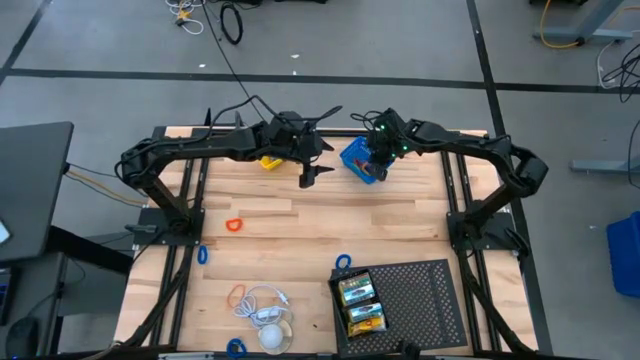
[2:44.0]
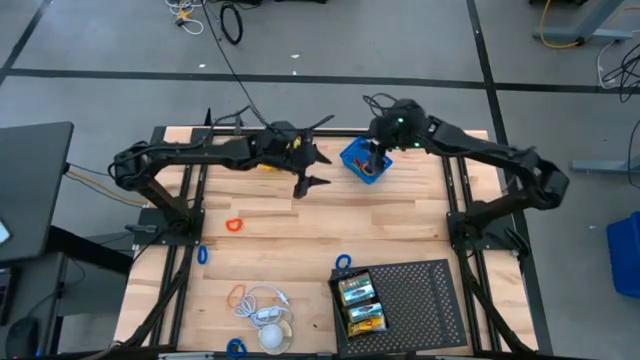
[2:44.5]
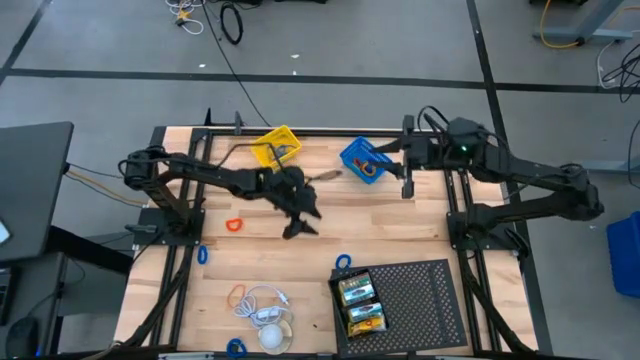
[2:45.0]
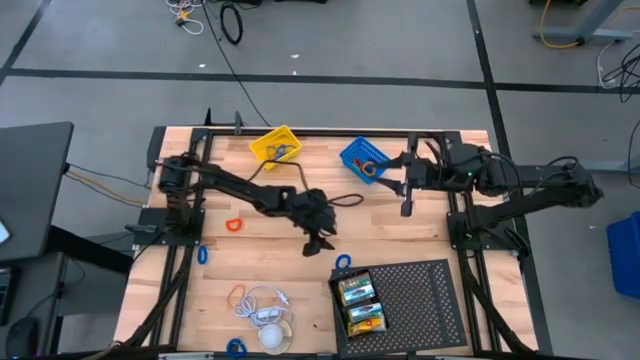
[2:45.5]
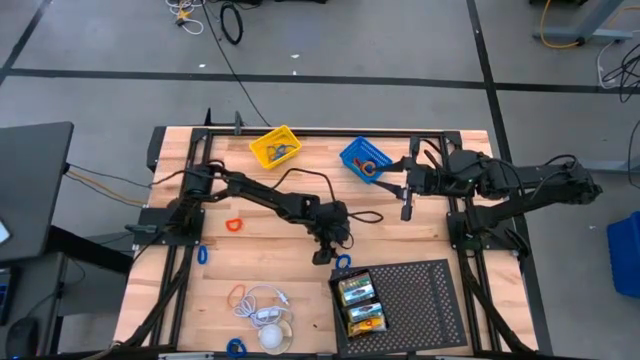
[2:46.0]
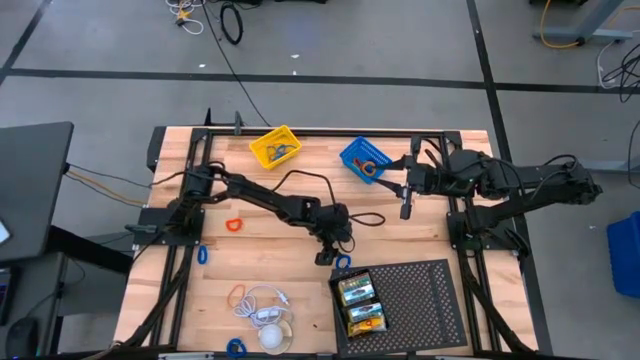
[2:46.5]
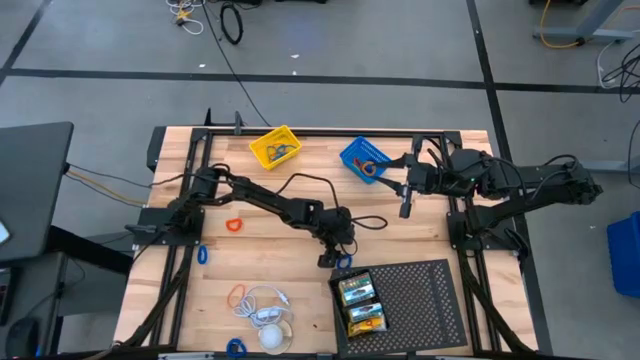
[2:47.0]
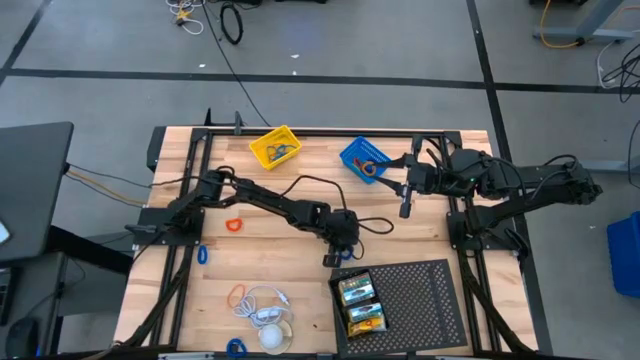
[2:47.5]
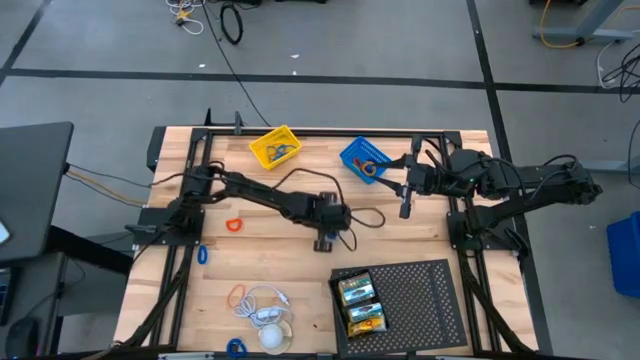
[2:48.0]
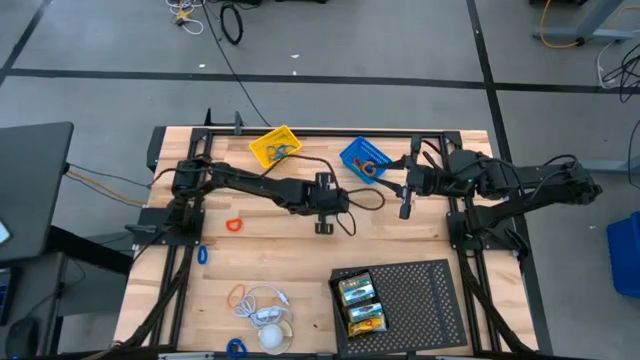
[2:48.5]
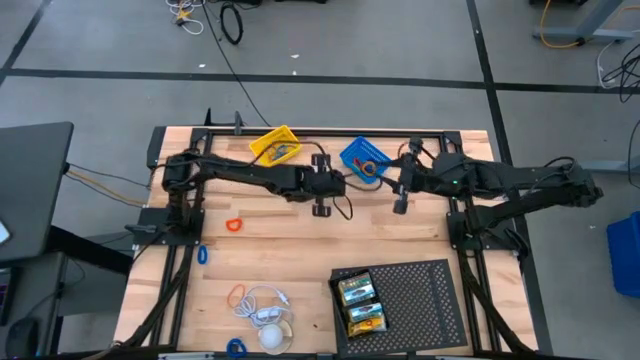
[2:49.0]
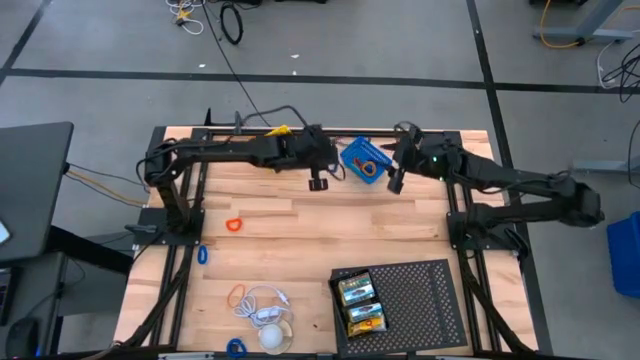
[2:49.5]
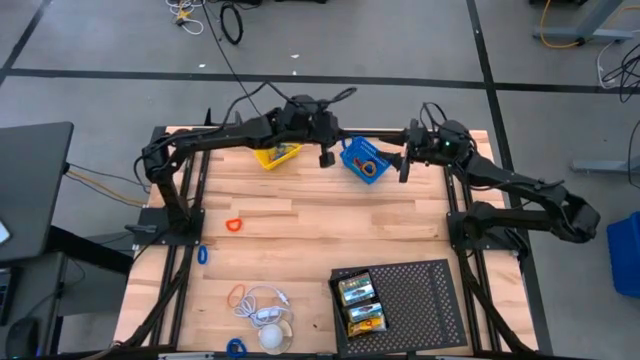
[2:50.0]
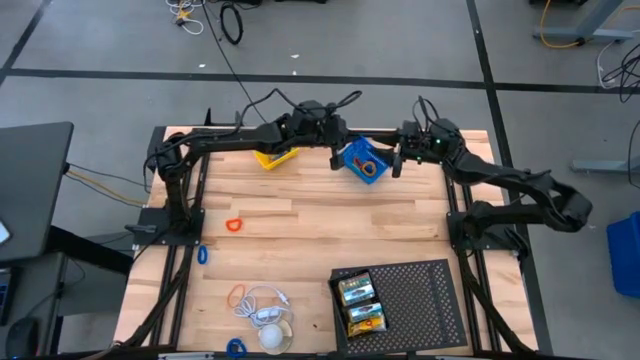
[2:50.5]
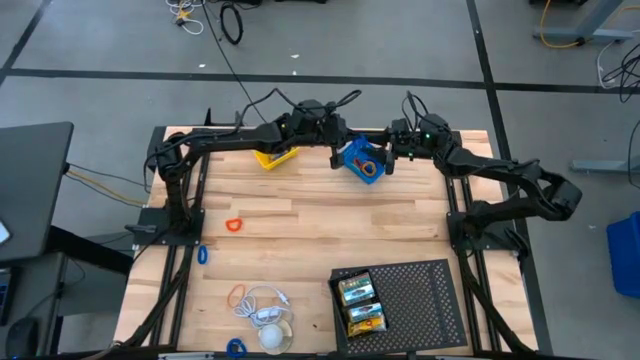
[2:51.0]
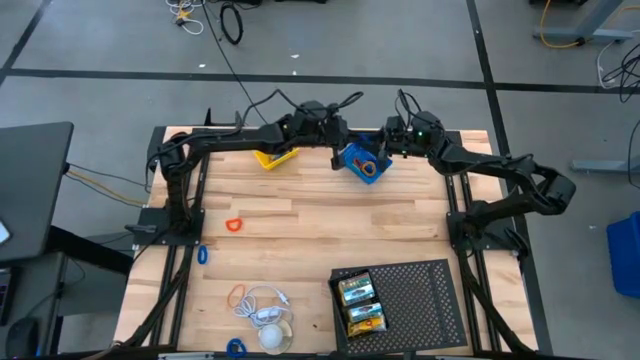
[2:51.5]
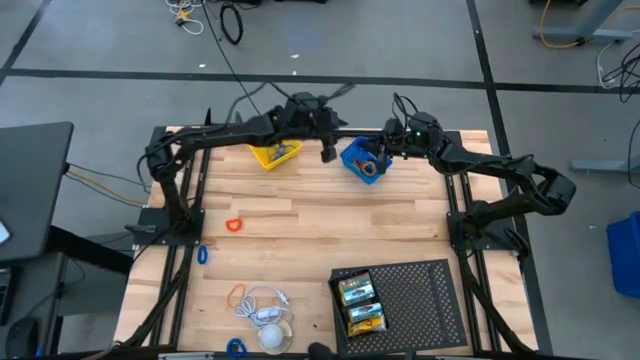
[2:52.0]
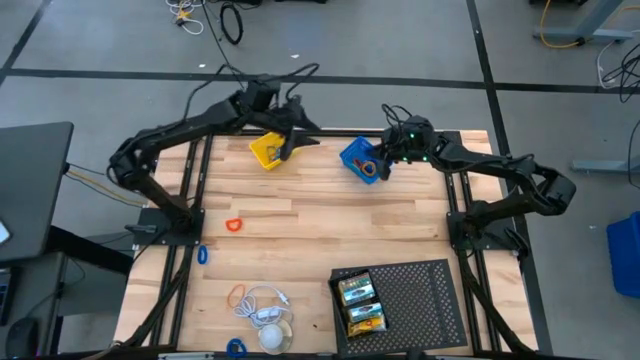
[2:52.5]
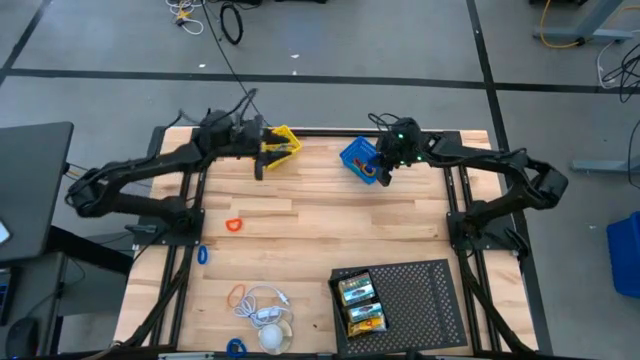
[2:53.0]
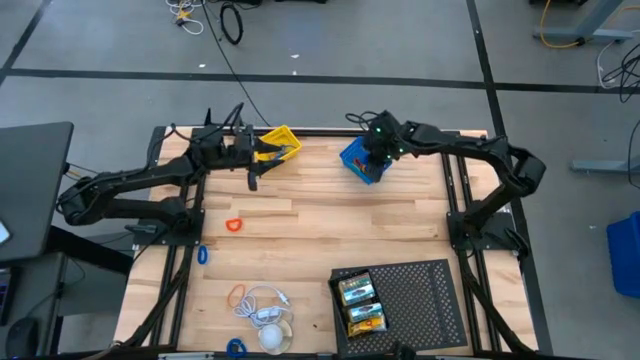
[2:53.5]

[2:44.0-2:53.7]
Task: Pick & Place Office Desk Supplies
Put the blue spring keychain into the blue basket

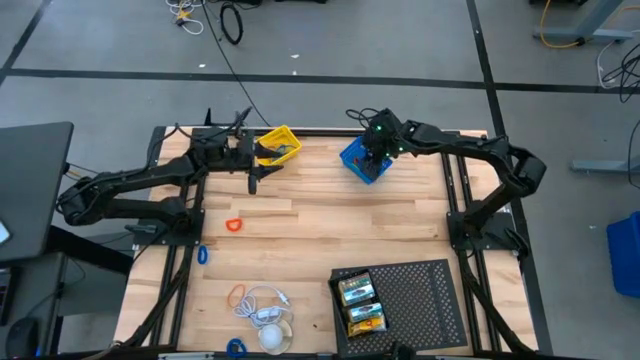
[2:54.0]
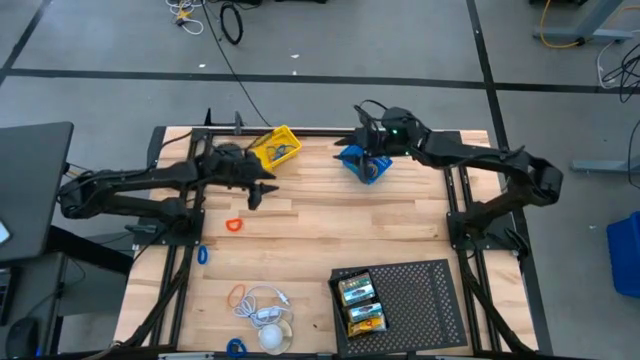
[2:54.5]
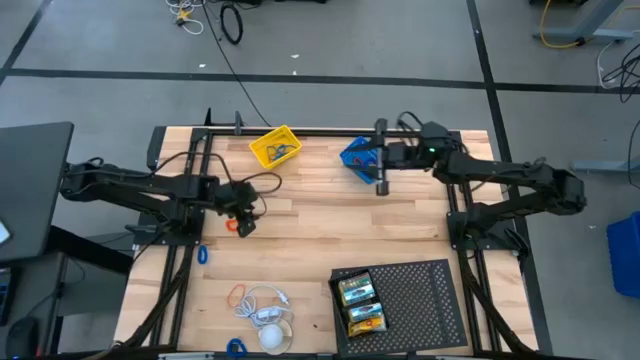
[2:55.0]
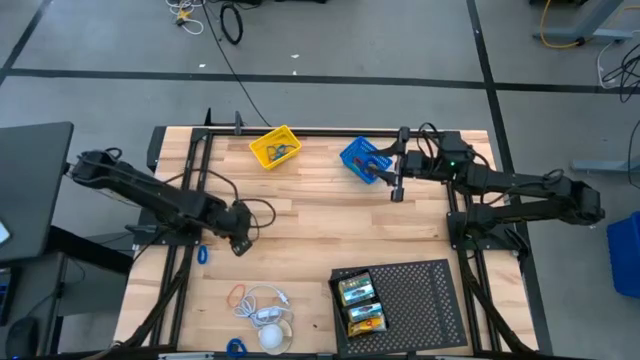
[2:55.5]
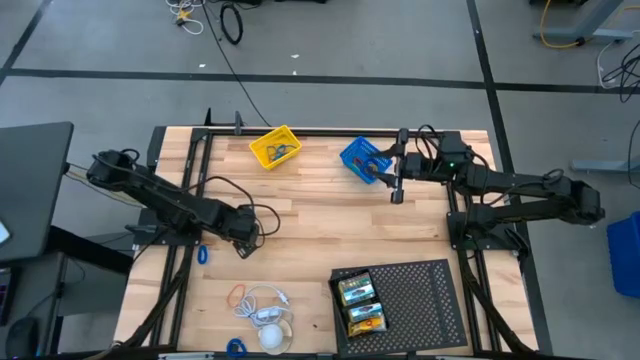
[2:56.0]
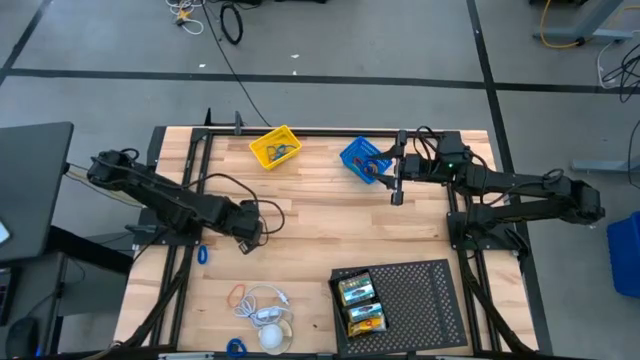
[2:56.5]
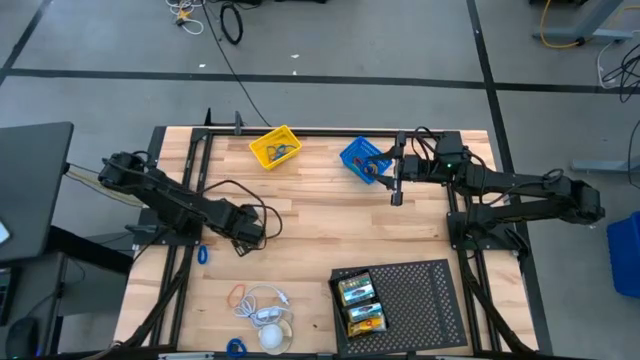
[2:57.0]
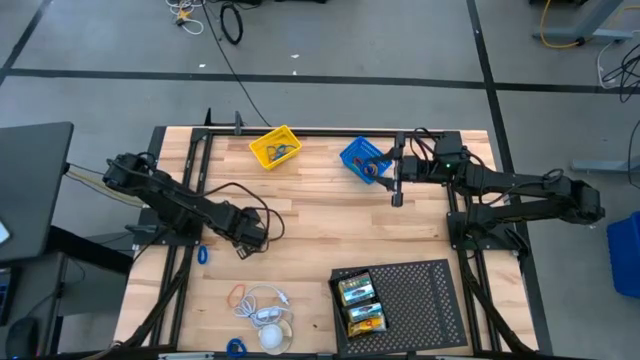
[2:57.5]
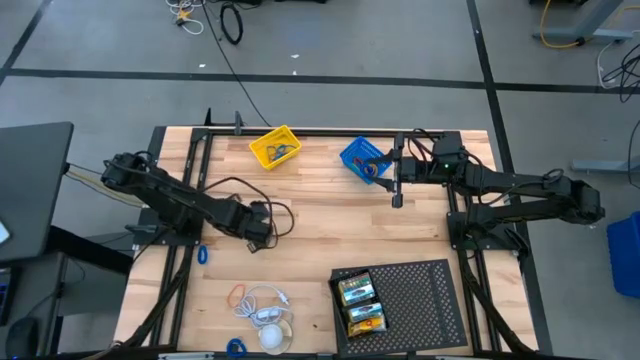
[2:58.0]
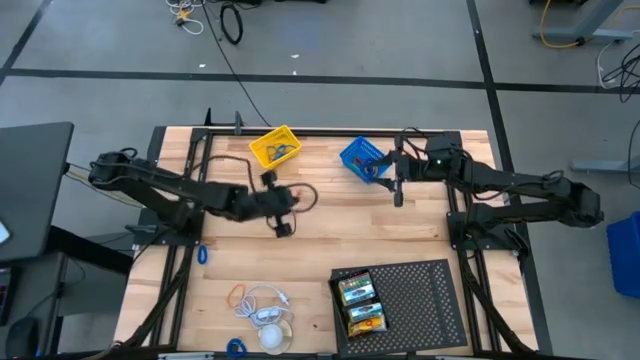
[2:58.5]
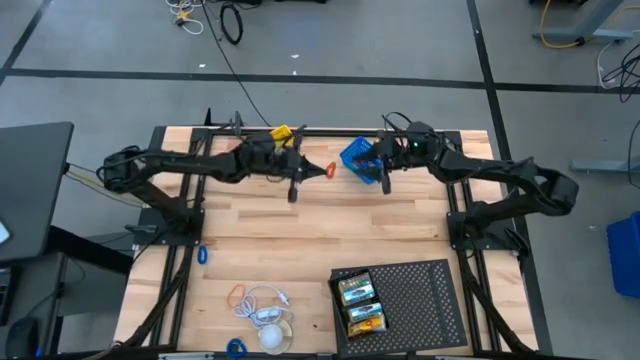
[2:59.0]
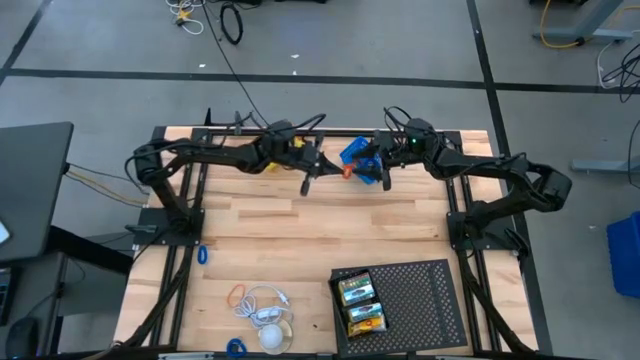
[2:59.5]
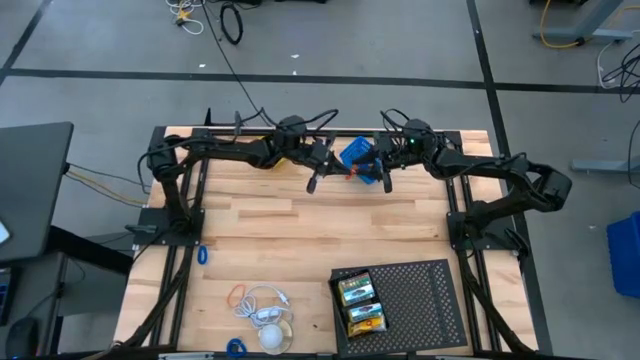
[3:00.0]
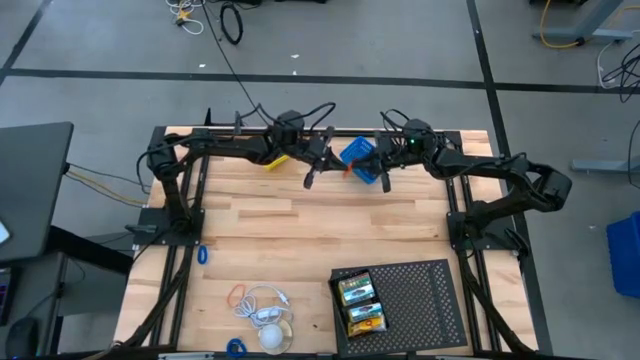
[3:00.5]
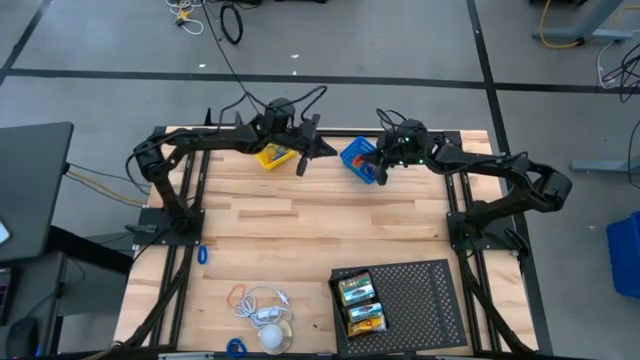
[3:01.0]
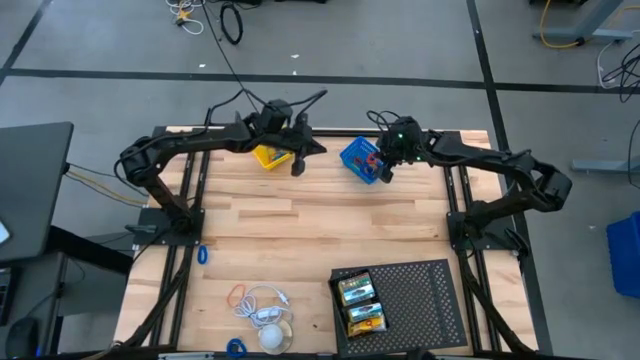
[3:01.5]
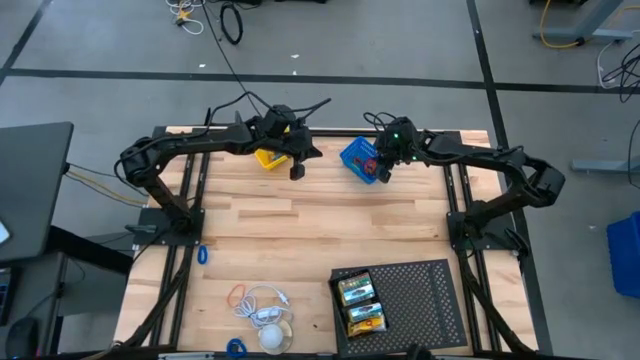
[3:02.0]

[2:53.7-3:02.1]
Put the orange spring keychain into the blue basket

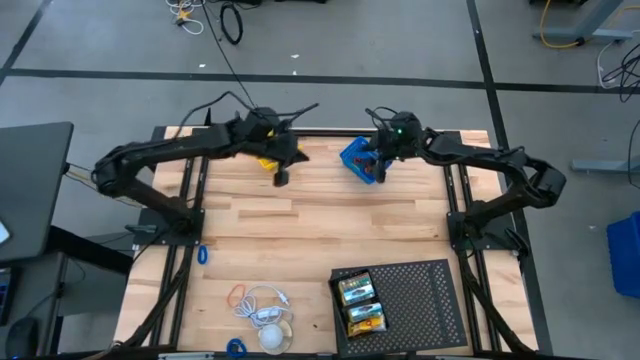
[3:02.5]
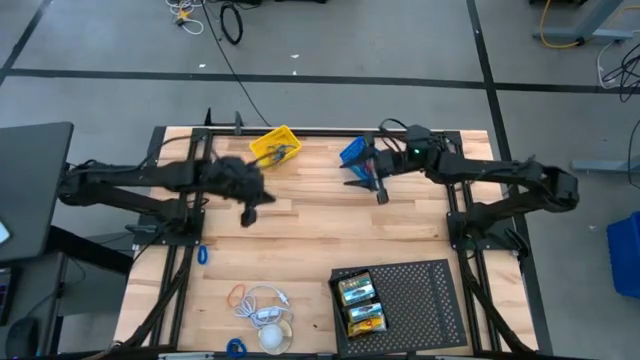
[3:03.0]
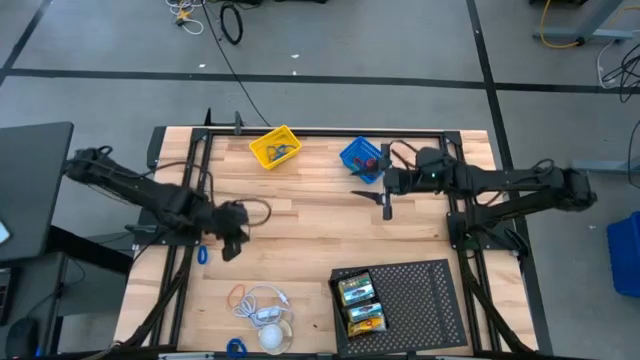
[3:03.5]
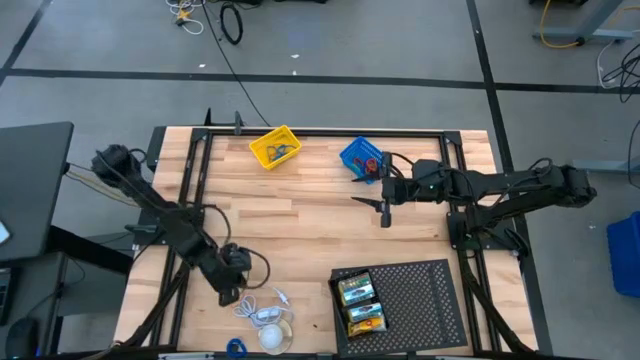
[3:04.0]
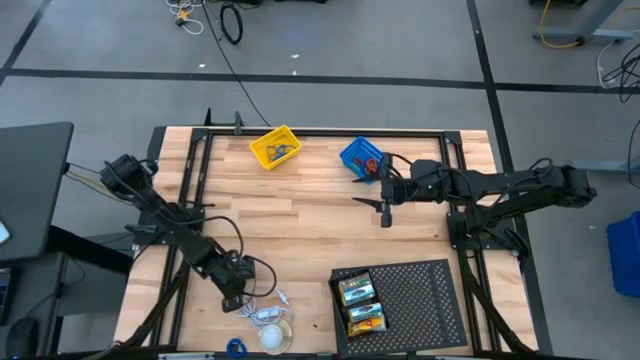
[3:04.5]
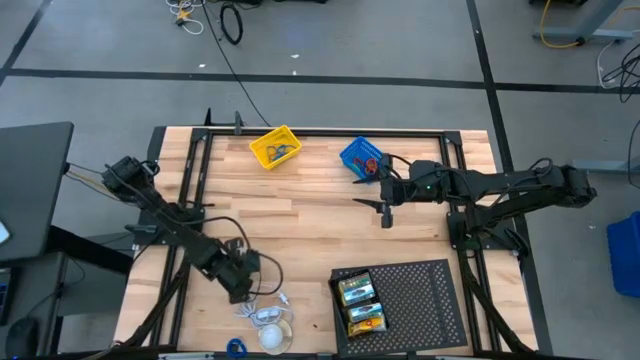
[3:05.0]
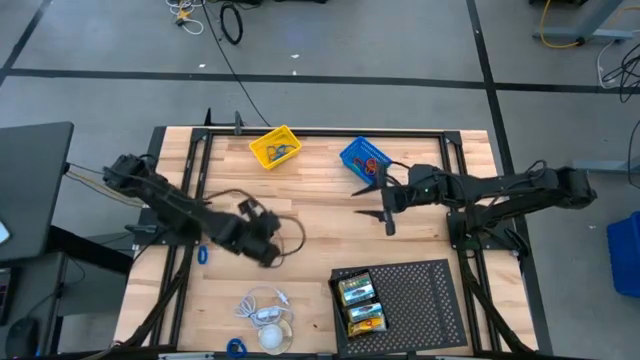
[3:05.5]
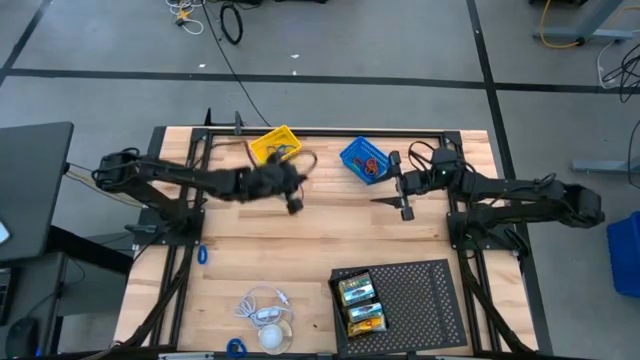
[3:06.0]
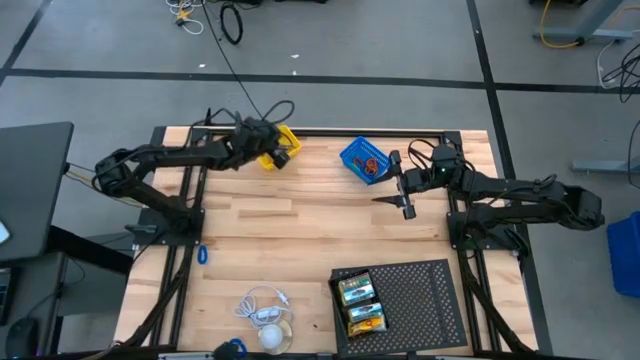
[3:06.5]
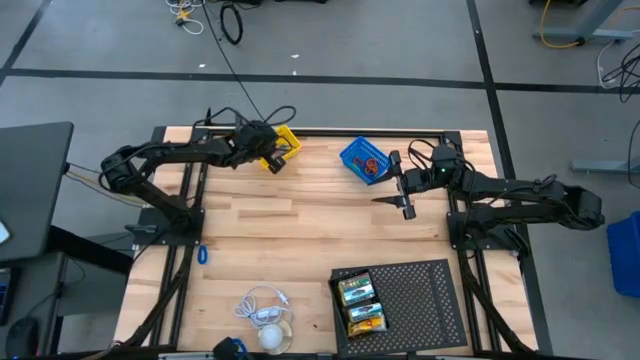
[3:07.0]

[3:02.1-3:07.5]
Put the orange rubber band into the yellow basket
